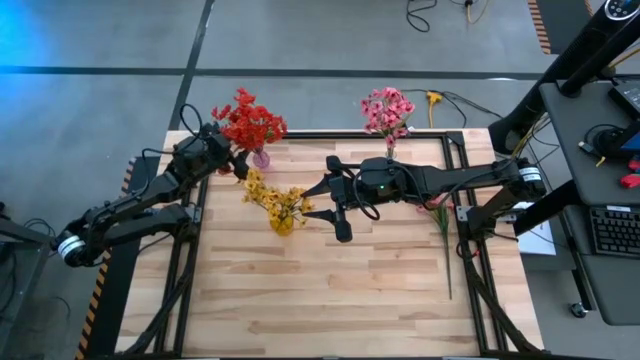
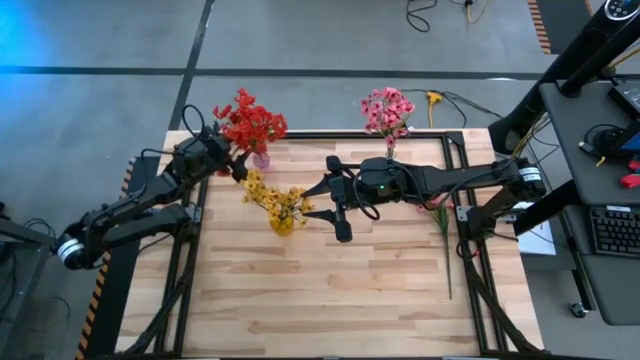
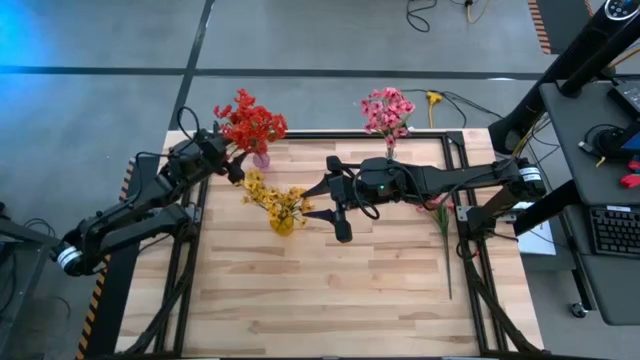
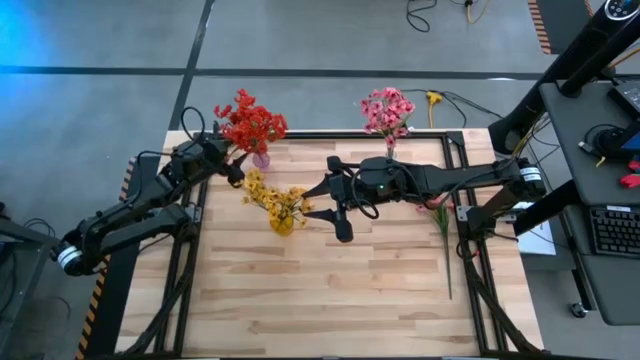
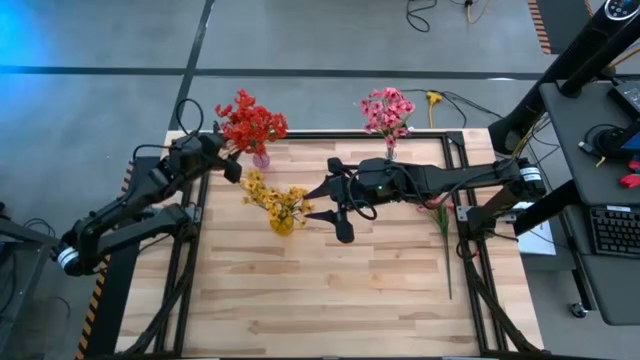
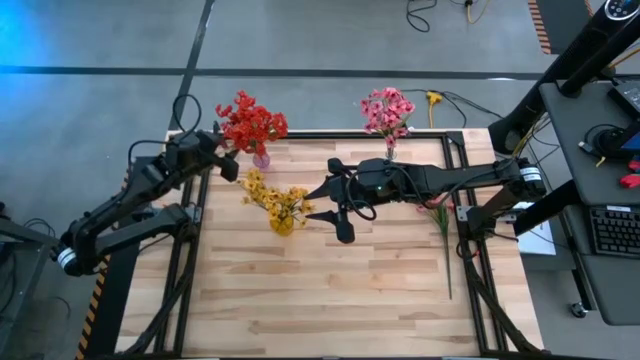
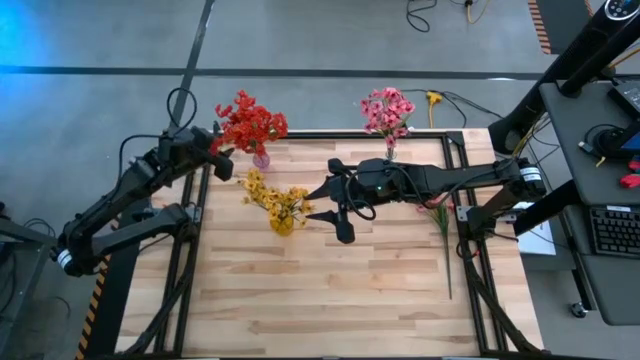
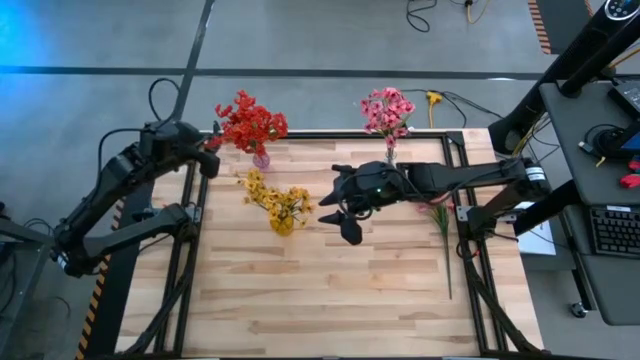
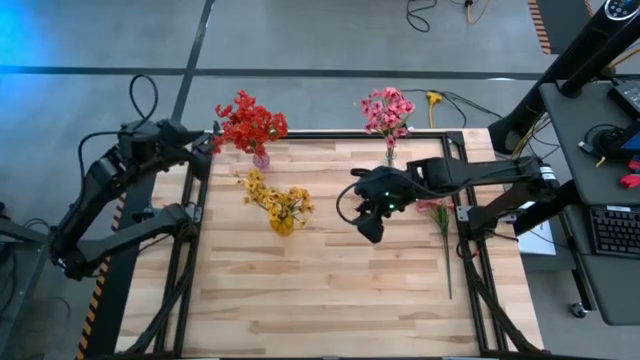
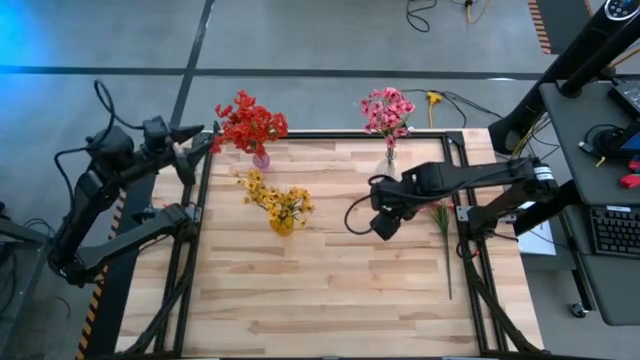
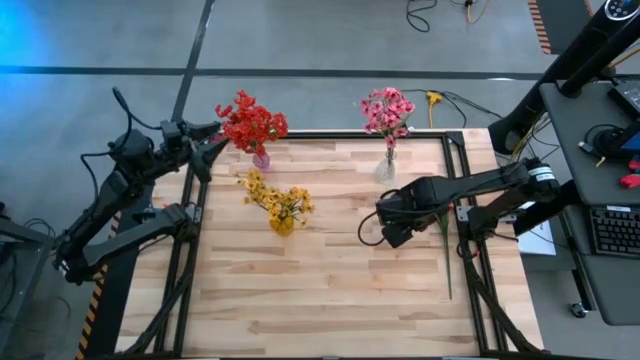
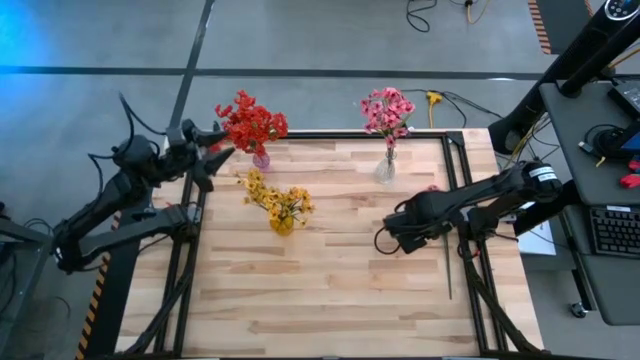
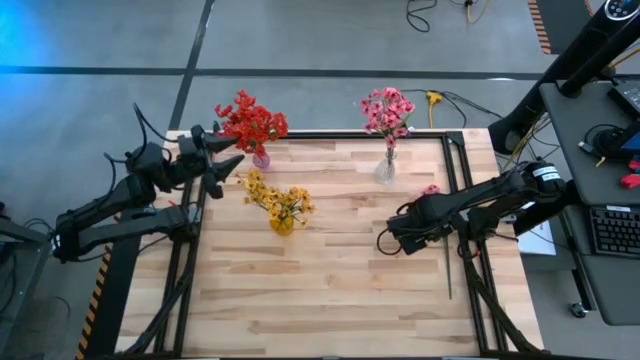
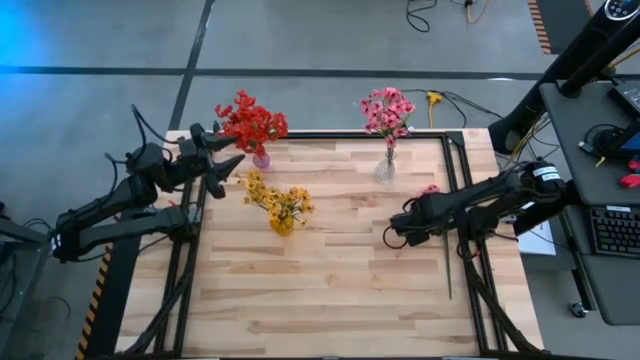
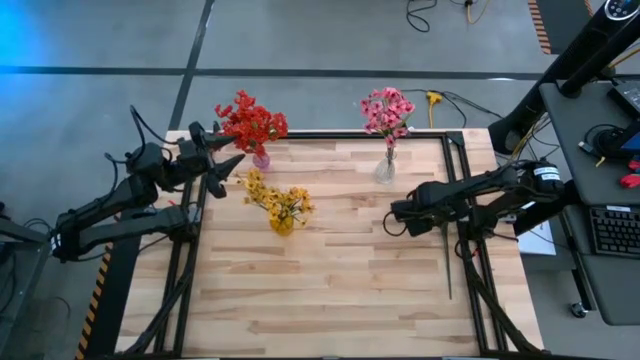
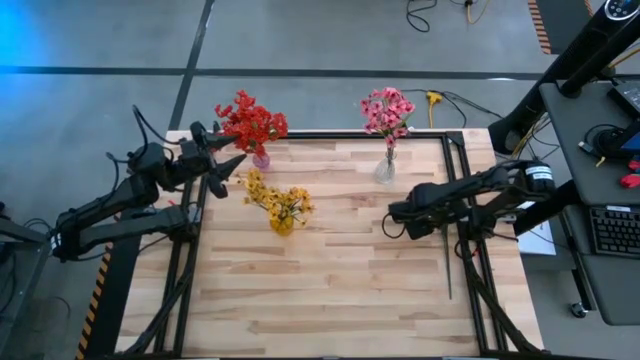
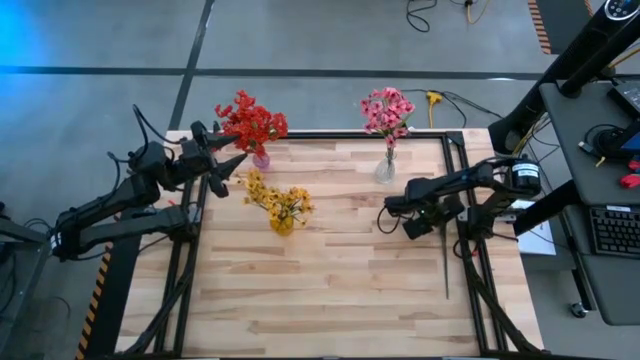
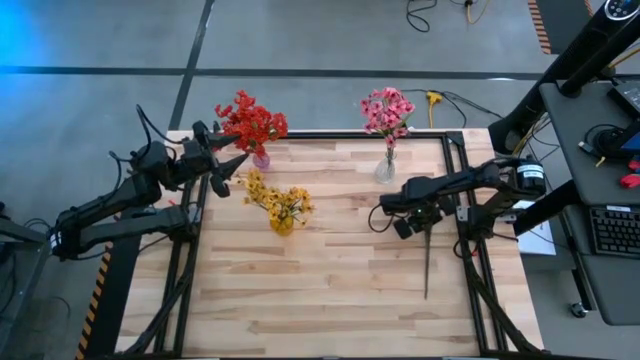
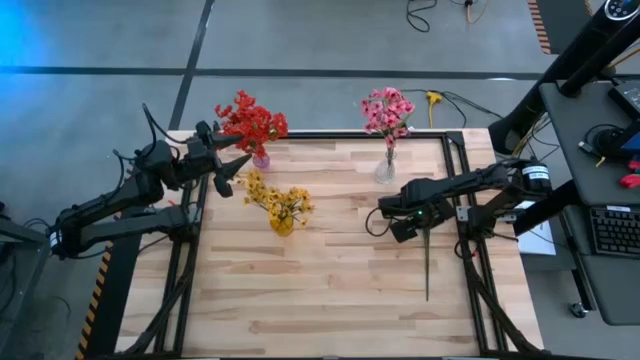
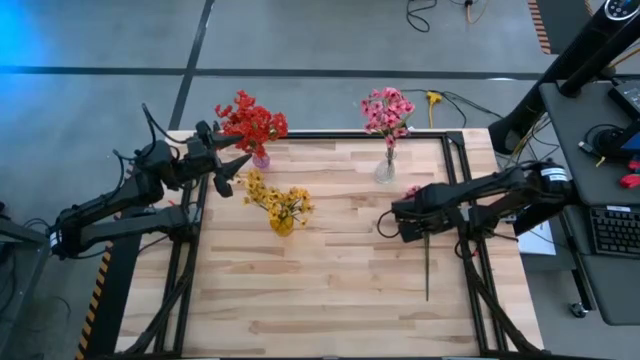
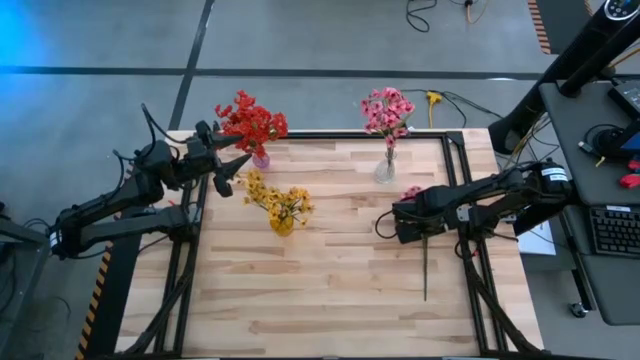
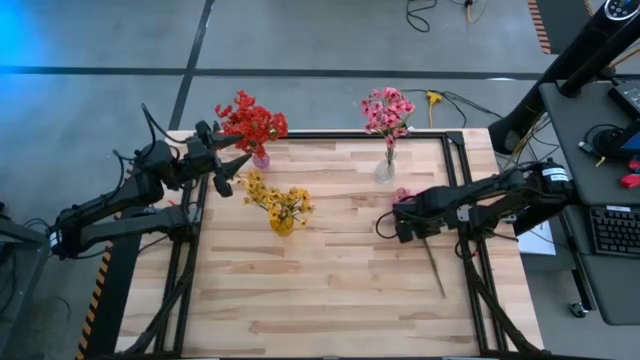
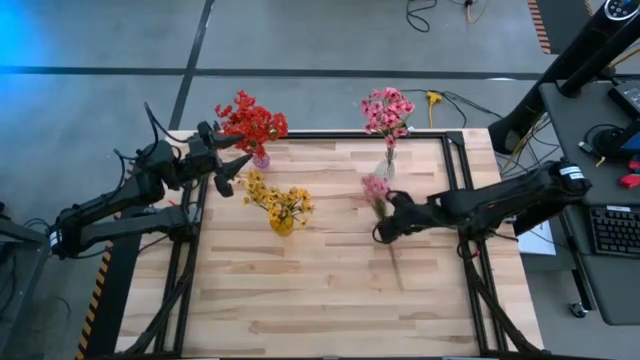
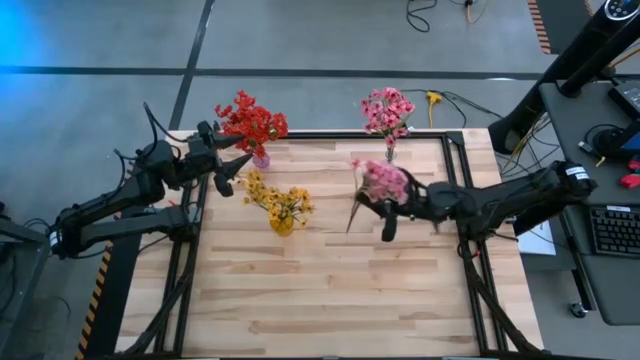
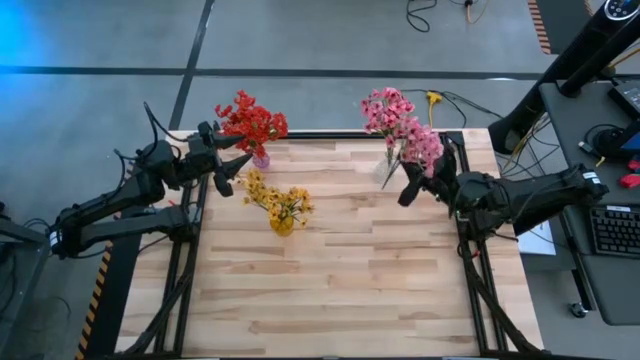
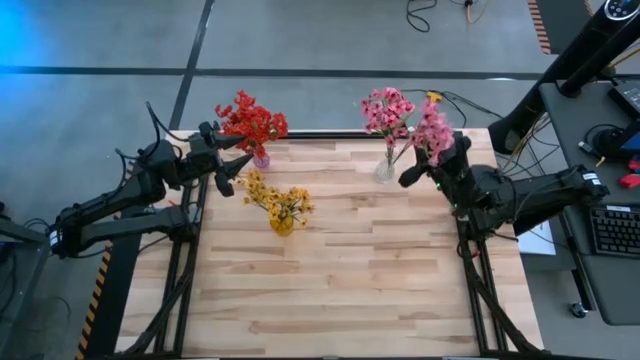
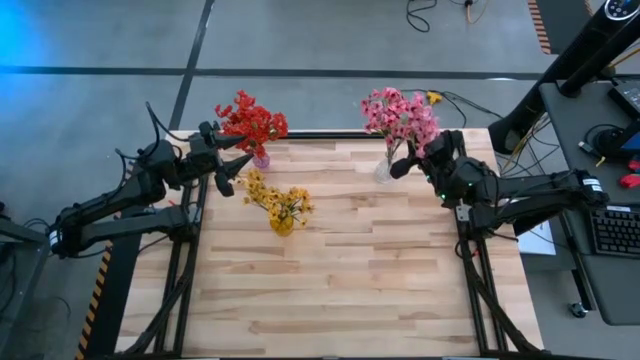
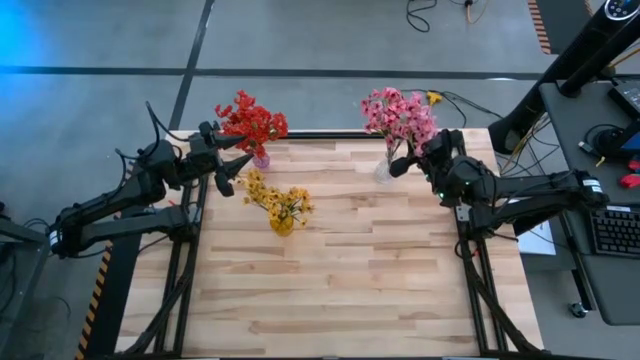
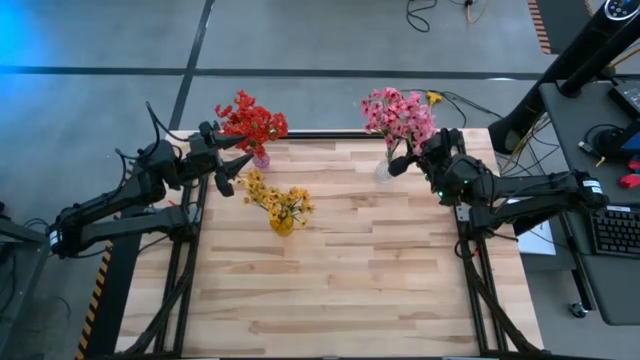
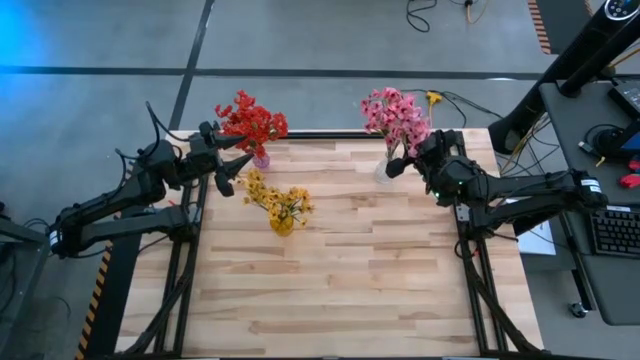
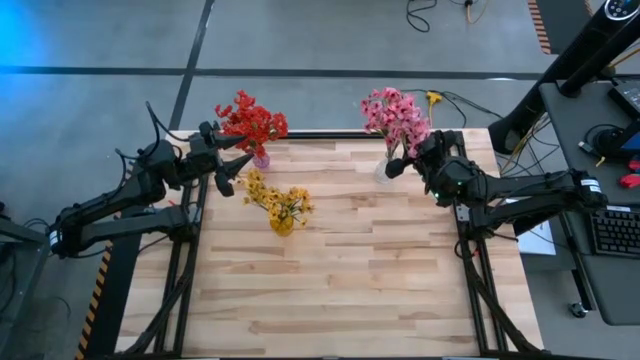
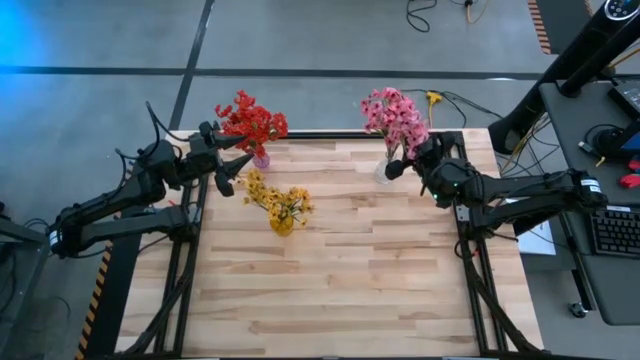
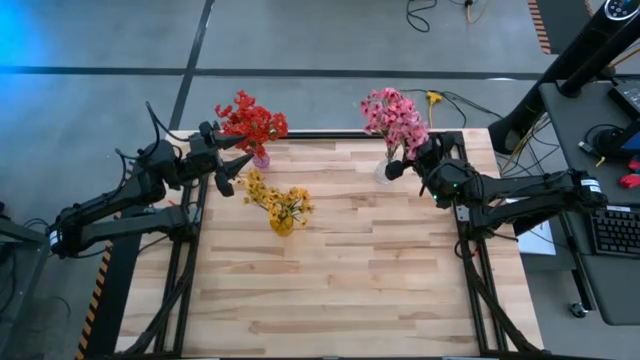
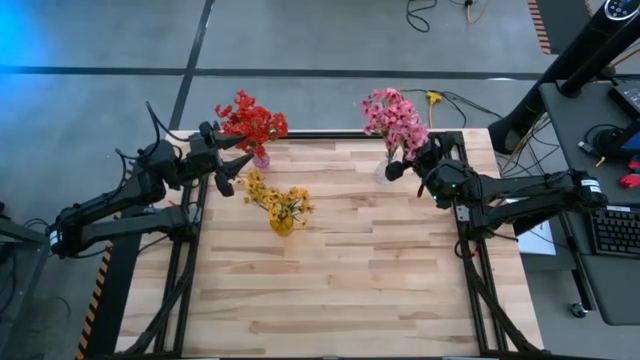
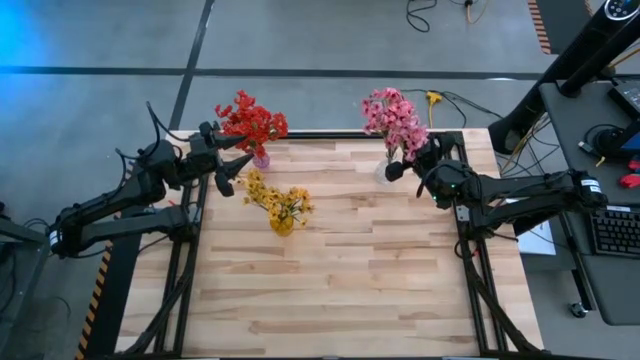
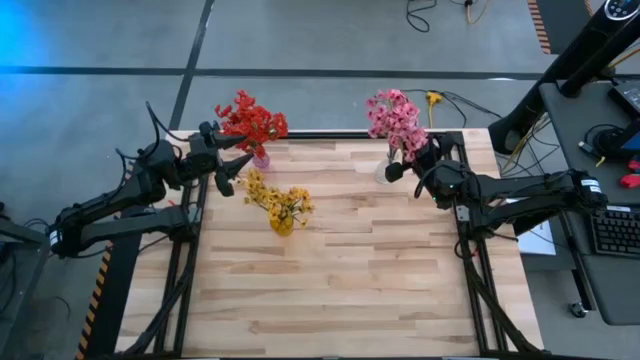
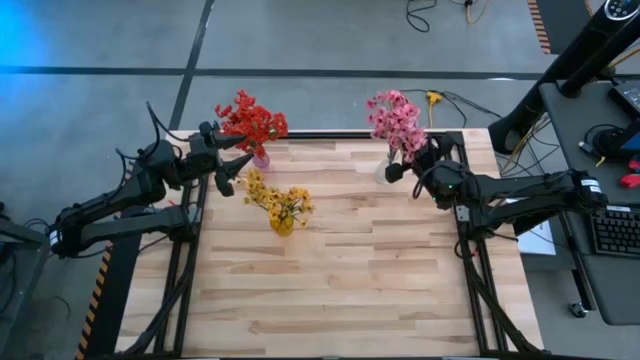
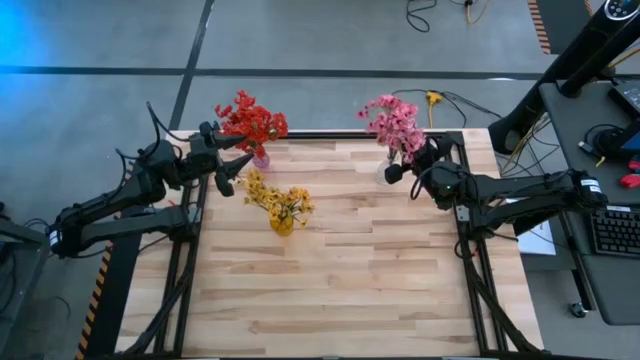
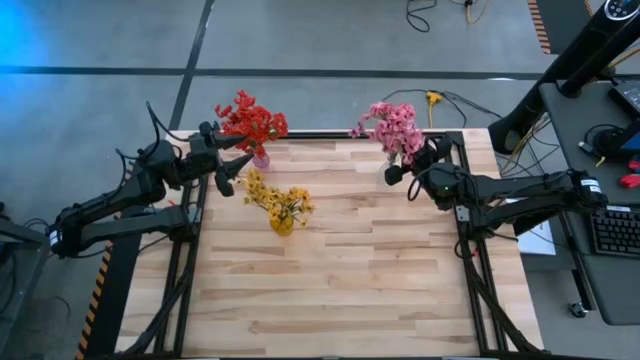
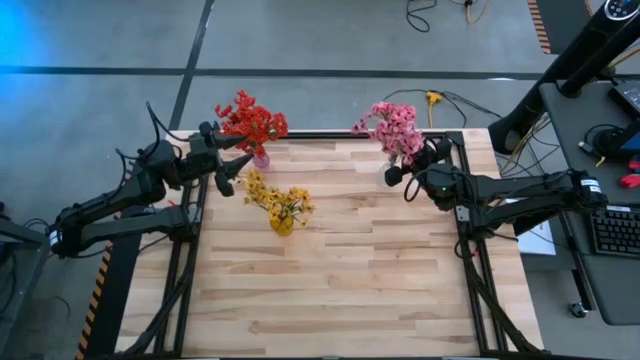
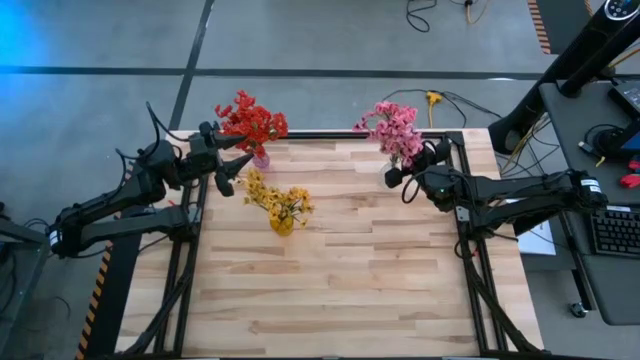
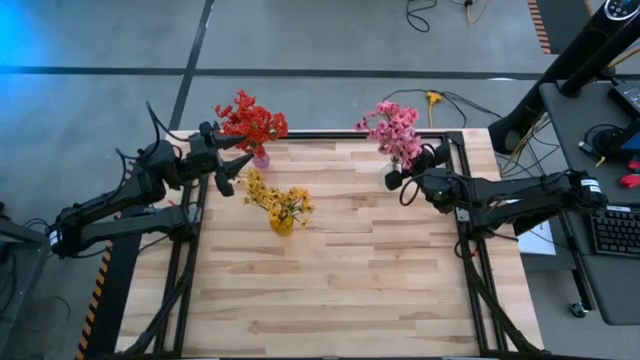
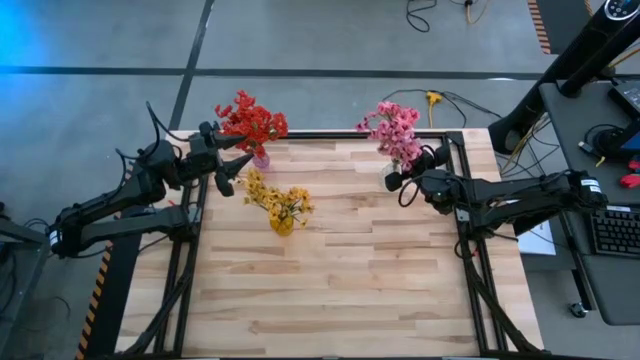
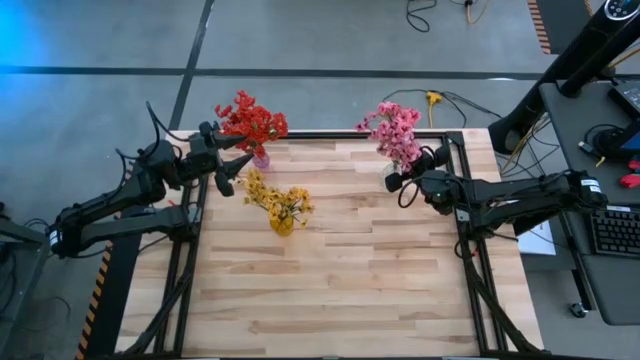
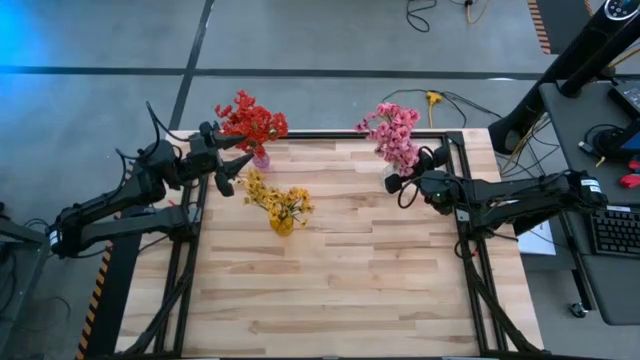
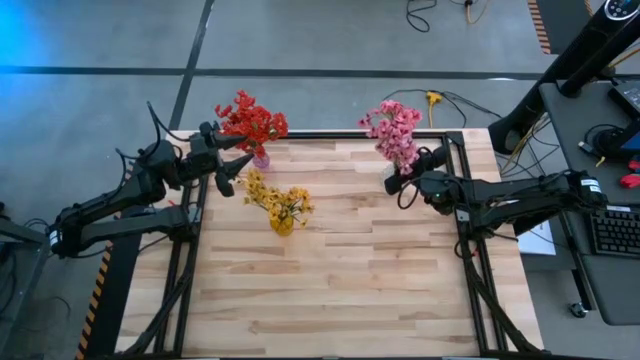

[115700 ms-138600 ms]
Task: Sort flowers into vase by color
Put the pink flower into the transparent flower vase
